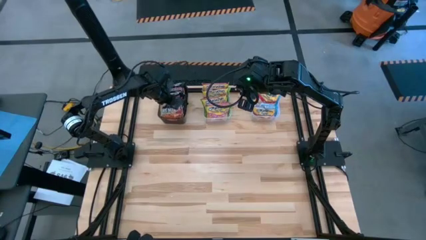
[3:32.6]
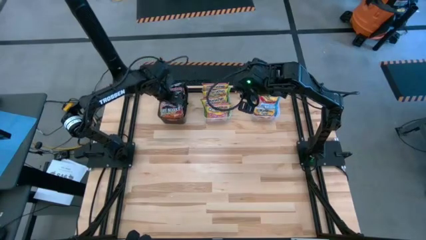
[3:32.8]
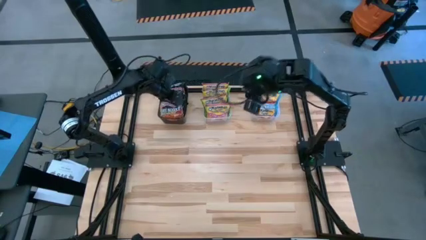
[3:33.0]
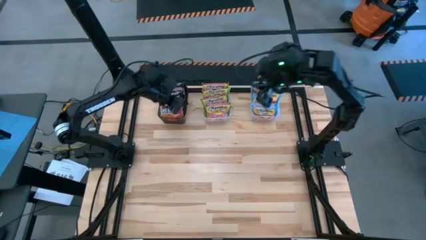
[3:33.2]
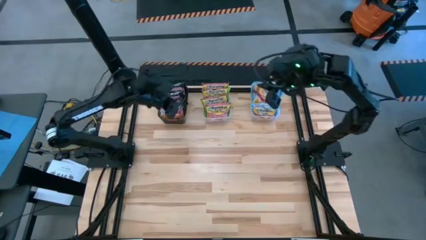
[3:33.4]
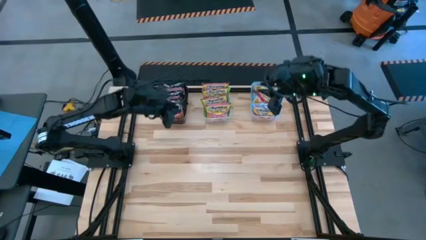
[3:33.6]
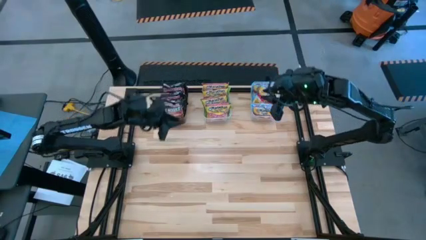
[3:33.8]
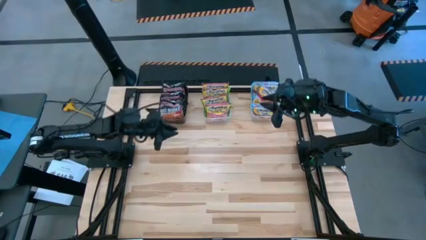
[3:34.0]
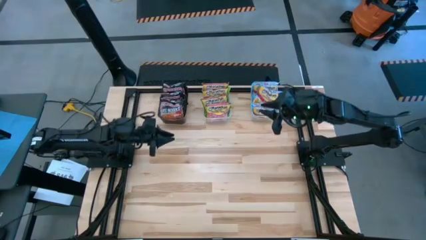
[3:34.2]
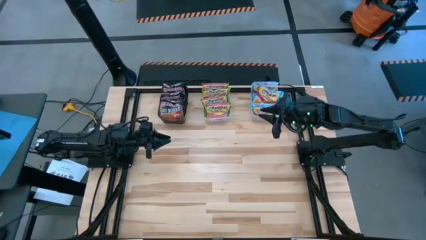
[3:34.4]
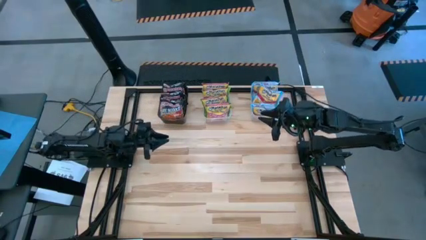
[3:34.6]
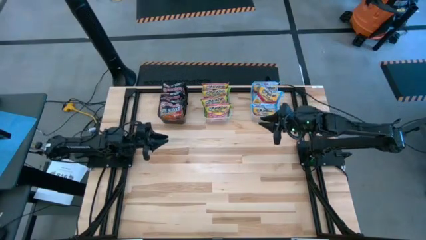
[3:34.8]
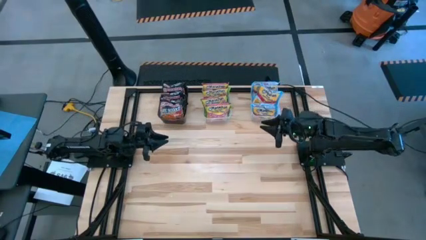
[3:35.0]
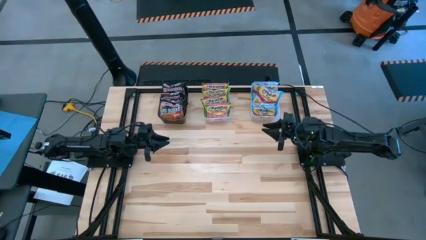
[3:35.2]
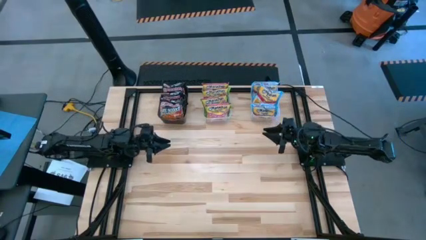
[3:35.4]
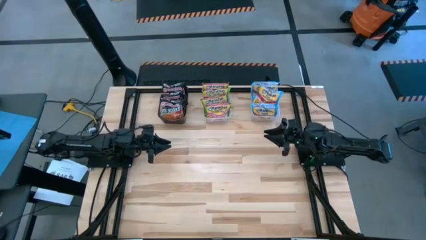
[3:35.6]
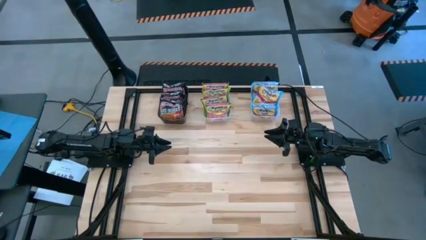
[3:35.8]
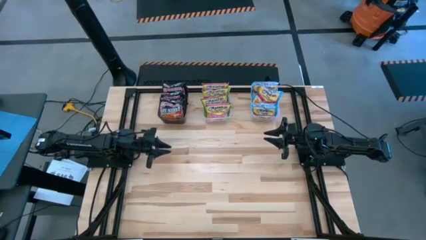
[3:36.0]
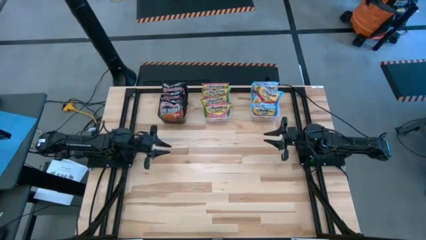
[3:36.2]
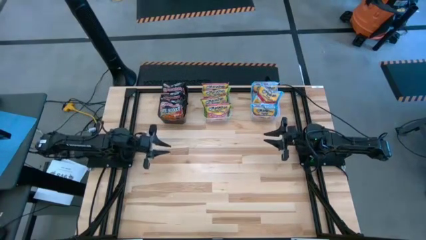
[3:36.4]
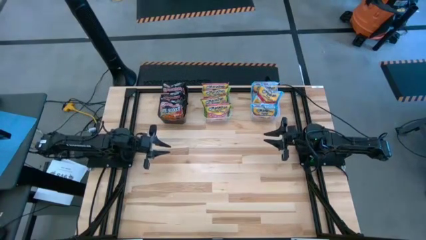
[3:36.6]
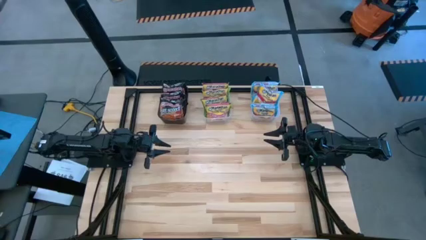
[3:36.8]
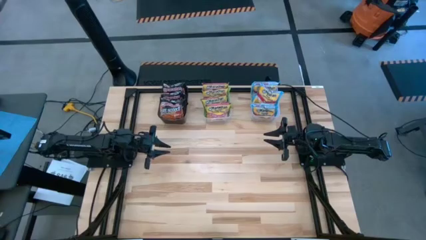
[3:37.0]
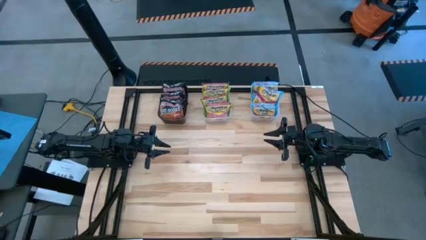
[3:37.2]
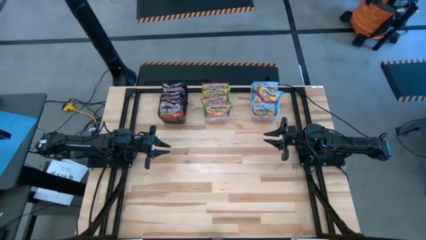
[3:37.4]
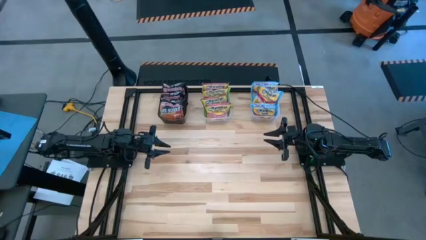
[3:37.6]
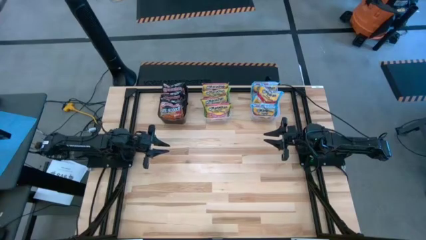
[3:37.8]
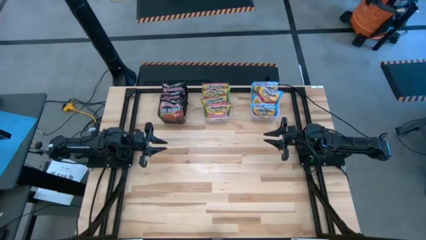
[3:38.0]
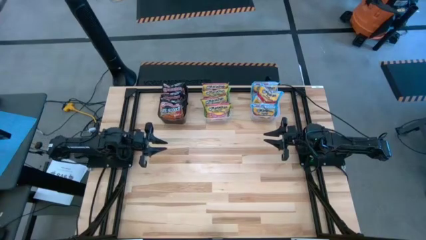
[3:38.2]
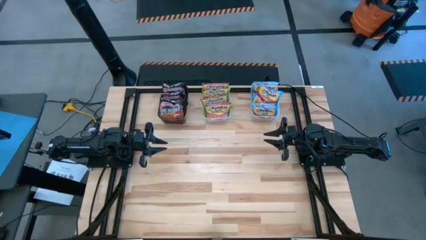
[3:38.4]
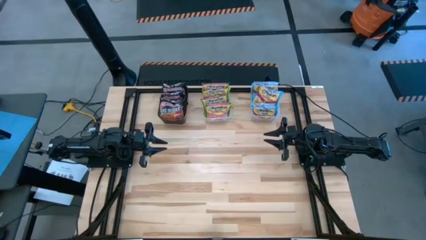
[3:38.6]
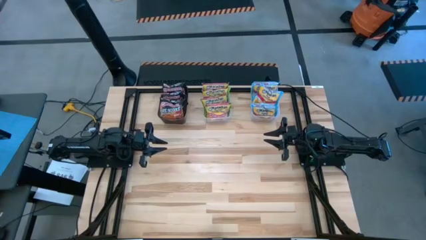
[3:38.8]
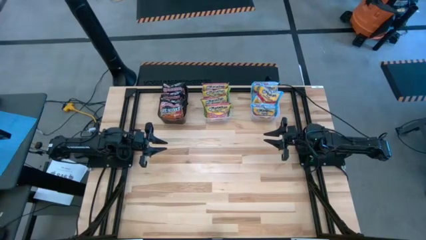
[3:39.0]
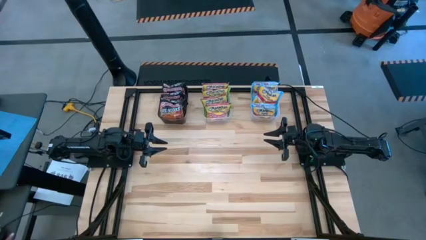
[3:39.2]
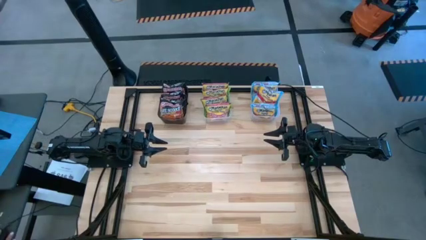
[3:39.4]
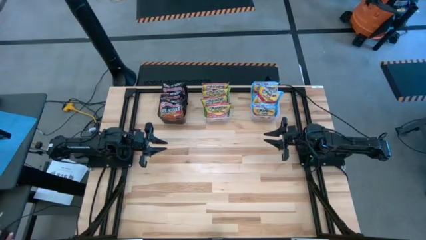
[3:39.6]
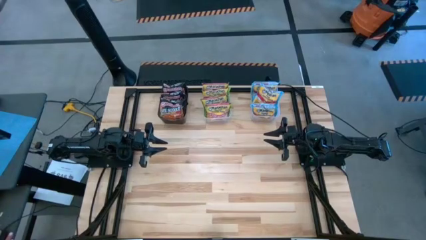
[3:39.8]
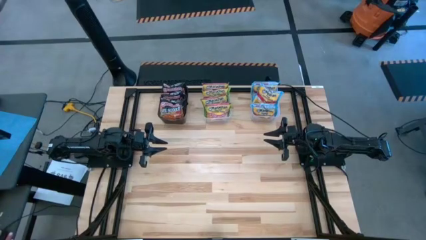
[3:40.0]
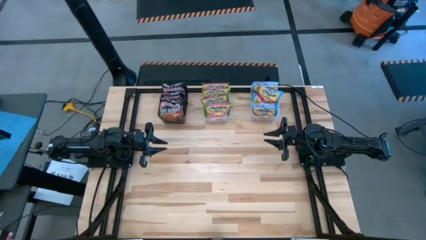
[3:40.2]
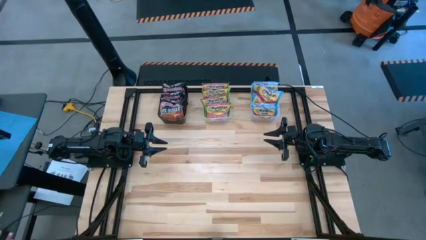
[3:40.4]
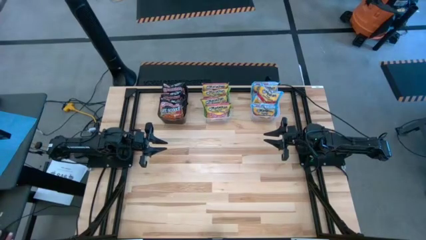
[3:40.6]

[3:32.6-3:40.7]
Task: Sort Maruchan noodles
Return to Home Position

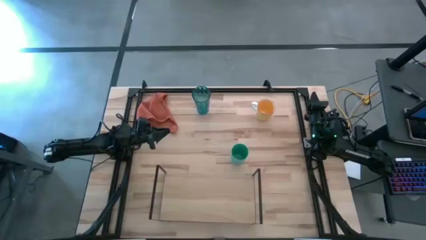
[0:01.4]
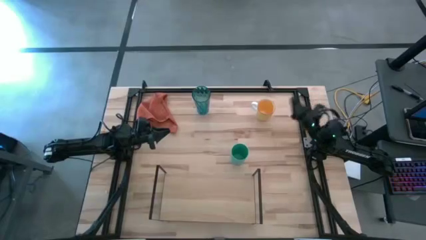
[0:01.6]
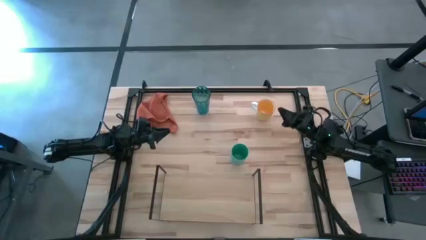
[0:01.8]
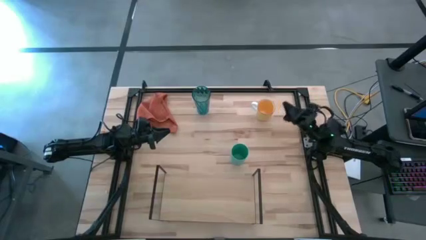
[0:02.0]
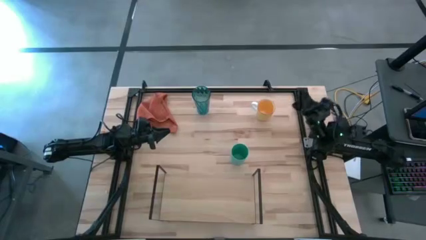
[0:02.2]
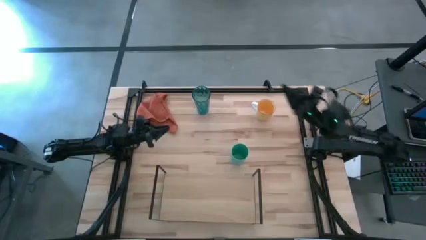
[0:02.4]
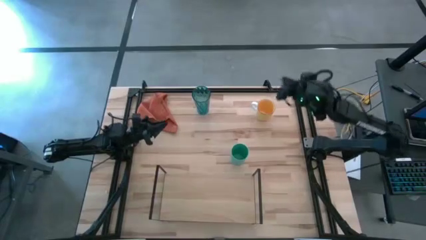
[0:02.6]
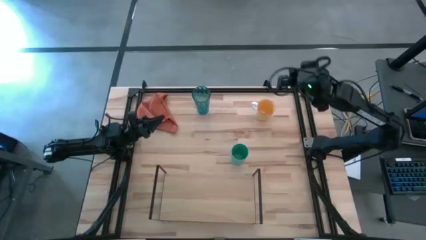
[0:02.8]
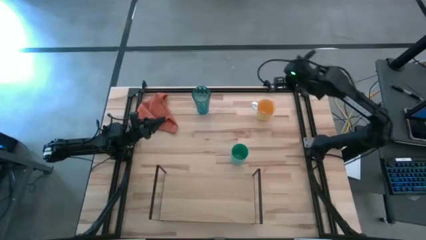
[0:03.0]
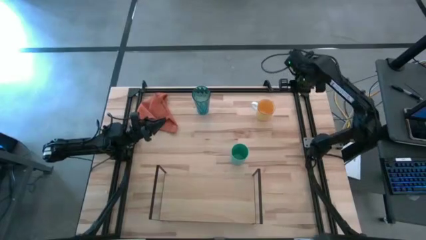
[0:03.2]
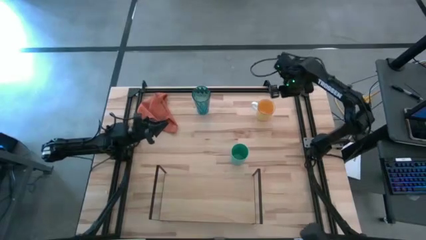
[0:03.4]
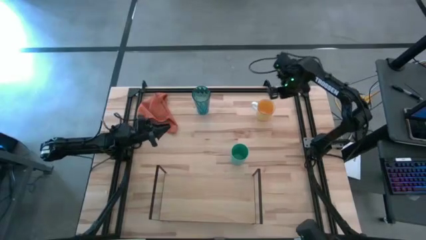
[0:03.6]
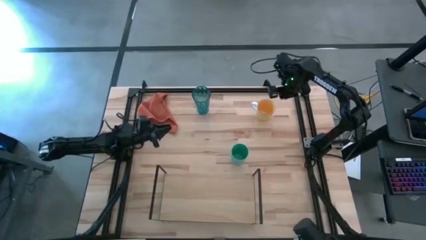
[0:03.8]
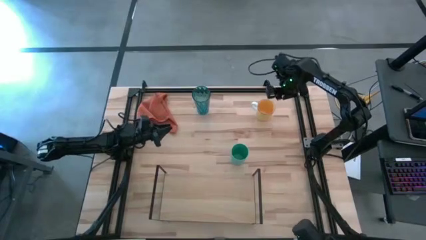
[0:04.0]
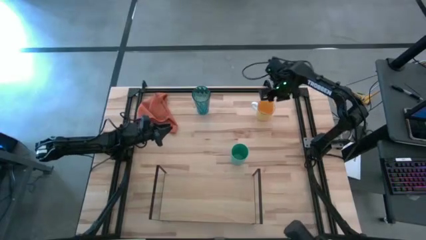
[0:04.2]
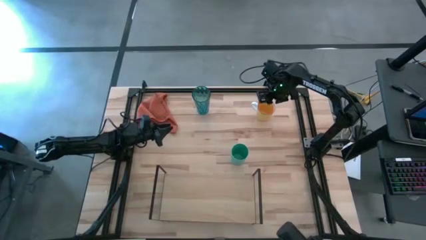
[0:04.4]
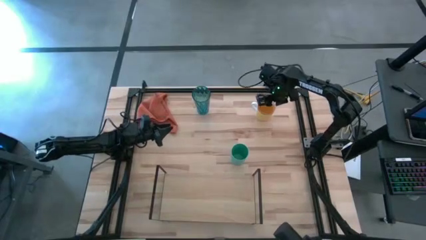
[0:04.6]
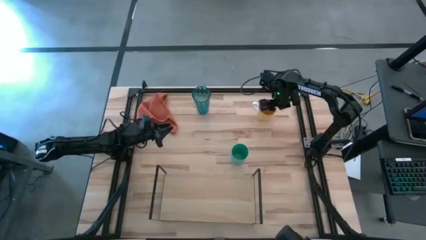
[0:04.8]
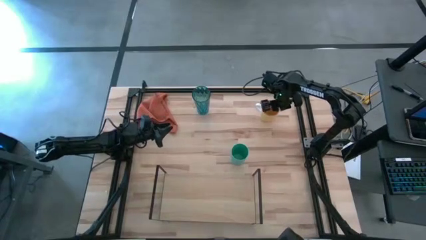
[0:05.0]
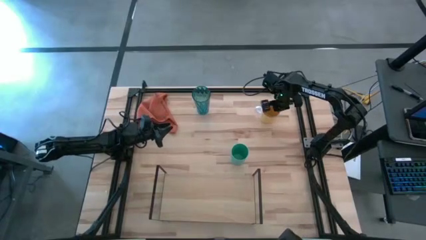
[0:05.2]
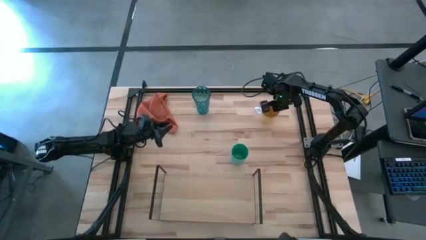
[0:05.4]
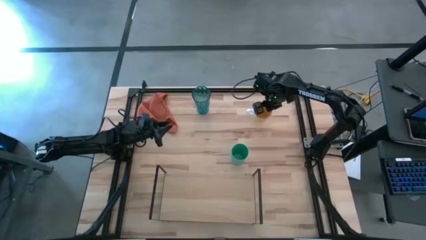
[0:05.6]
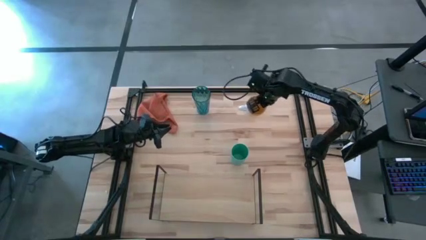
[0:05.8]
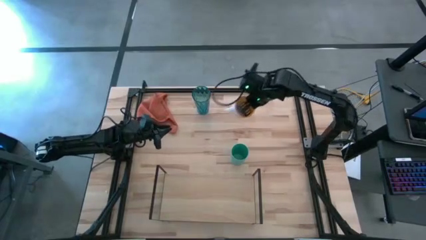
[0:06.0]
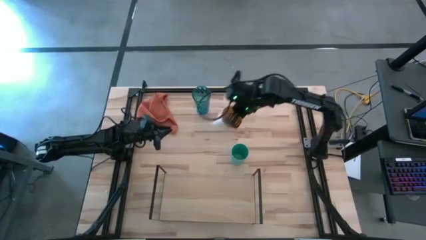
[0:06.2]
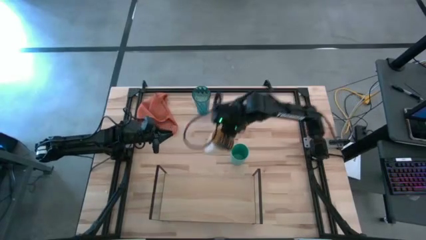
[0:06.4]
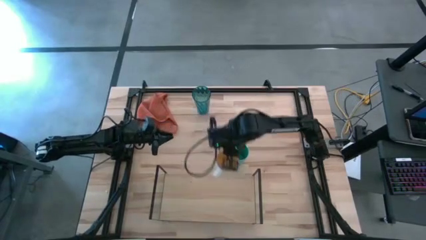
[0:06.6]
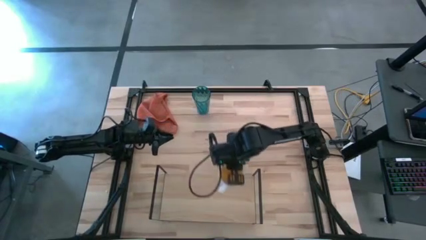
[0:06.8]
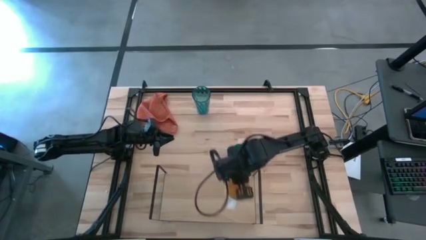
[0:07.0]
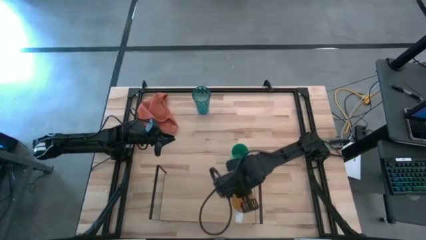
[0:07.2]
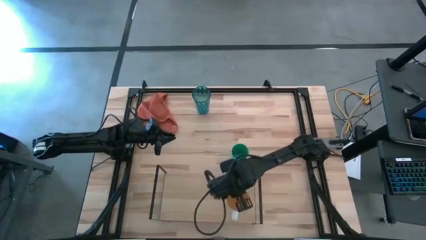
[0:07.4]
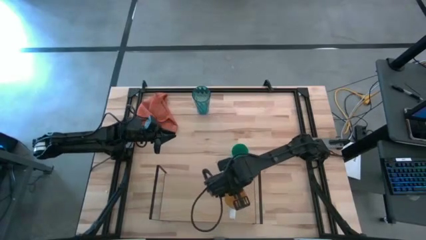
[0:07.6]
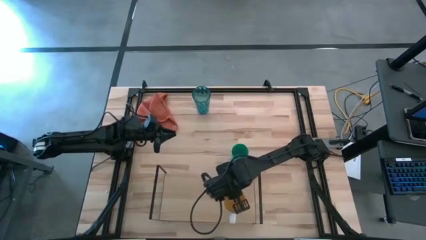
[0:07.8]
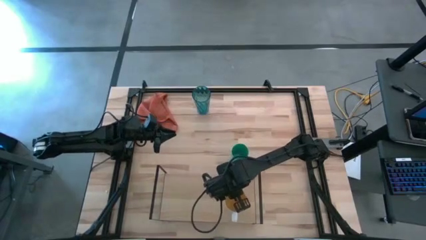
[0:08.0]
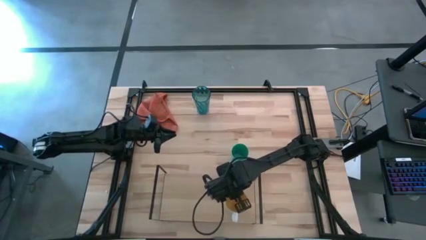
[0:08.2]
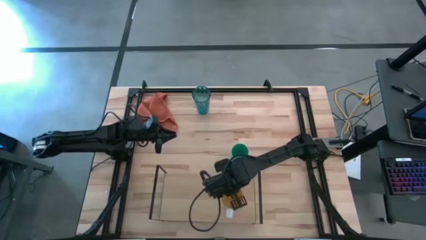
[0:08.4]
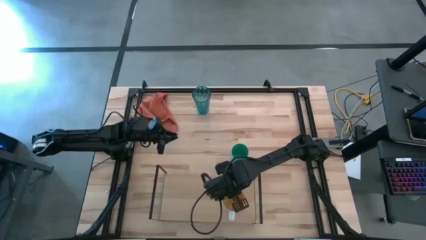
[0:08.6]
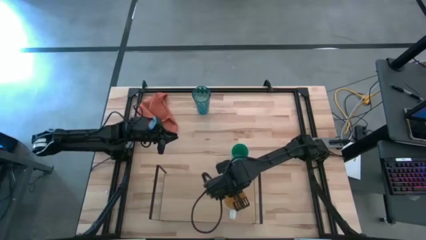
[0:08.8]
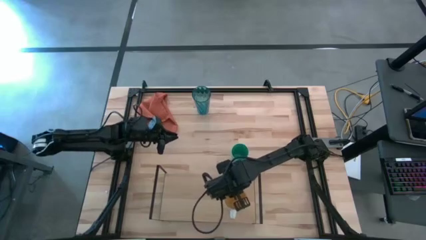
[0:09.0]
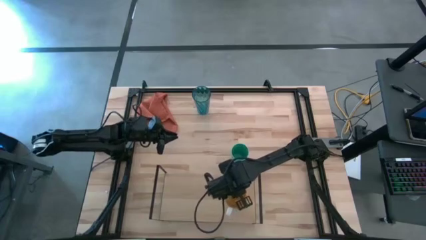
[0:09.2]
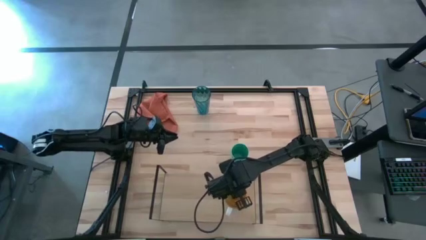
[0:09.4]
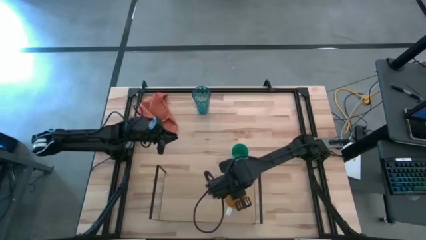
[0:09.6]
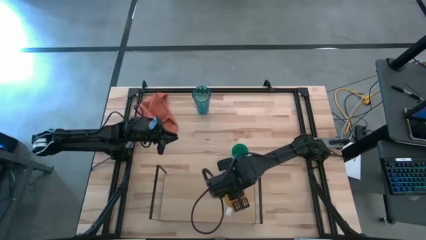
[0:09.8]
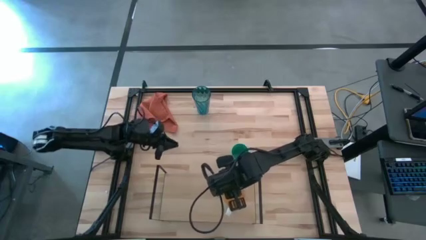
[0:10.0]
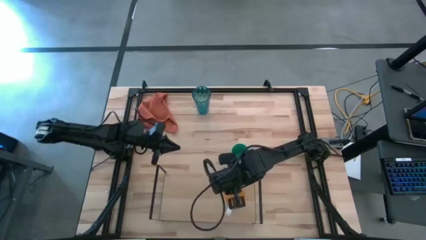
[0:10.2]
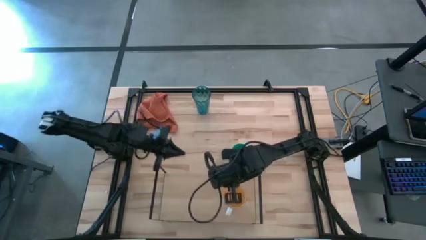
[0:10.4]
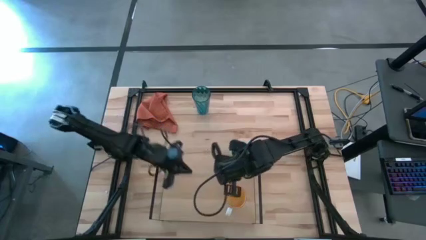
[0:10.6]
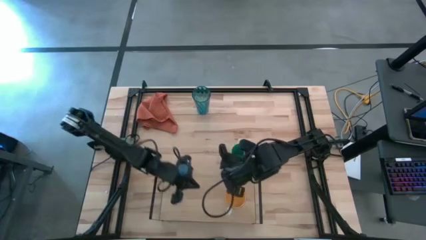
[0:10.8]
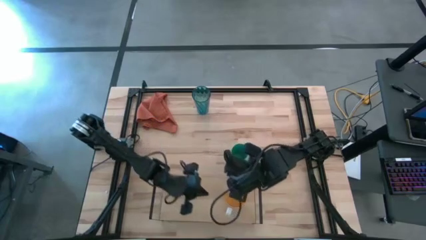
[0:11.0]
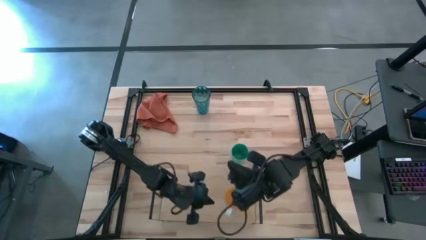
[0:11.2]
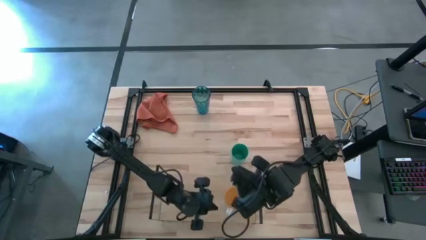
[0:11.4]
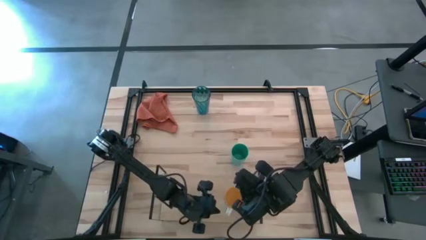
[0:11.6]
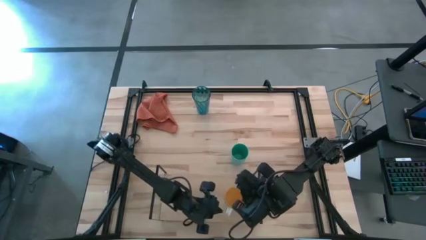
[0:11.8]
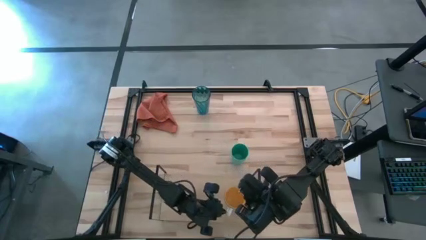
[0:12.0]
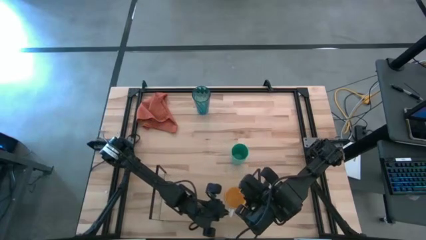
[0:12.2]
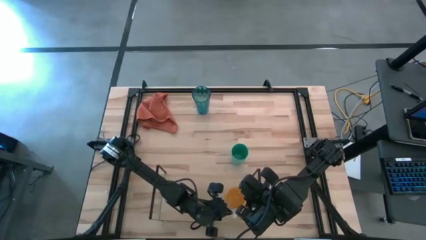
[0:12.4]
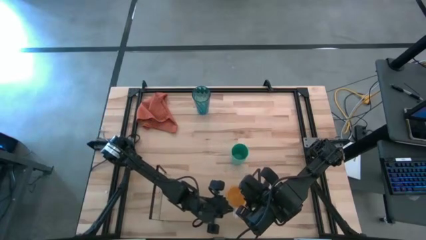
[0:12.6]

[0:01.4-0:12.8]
Task: Stack small to large cups/mugs on shelf
Put the yellow mug on the shelf
